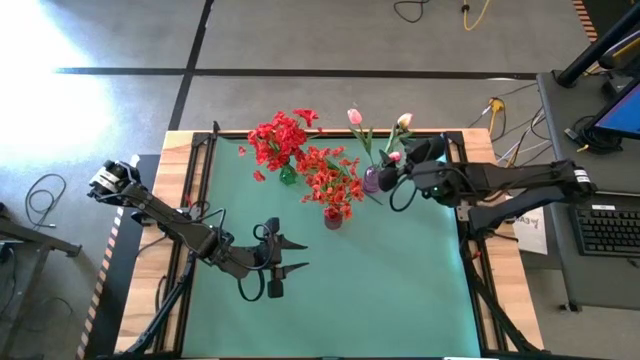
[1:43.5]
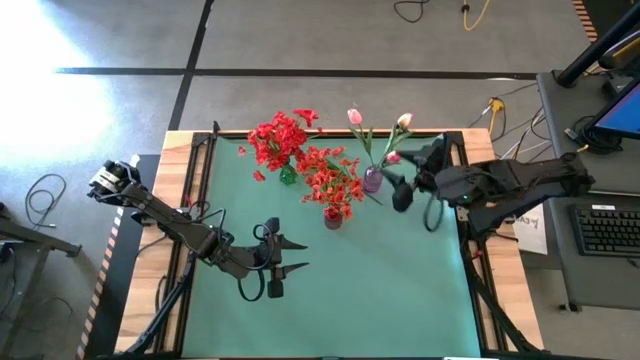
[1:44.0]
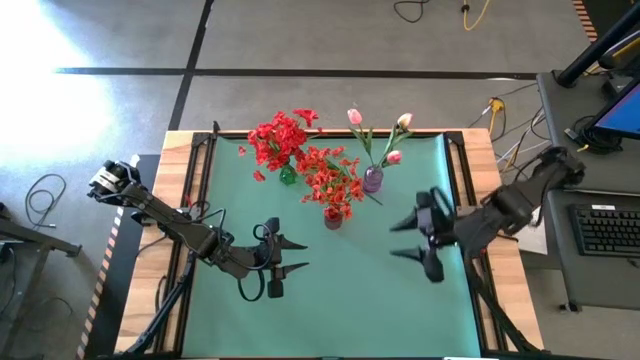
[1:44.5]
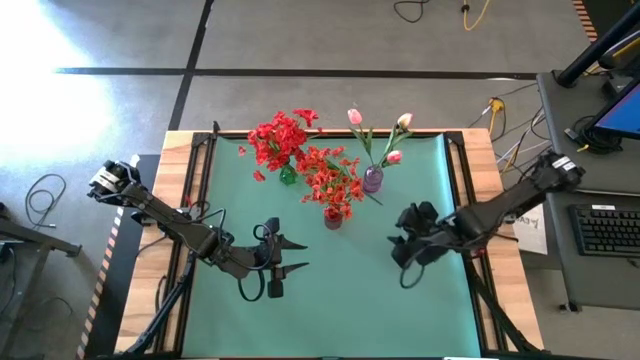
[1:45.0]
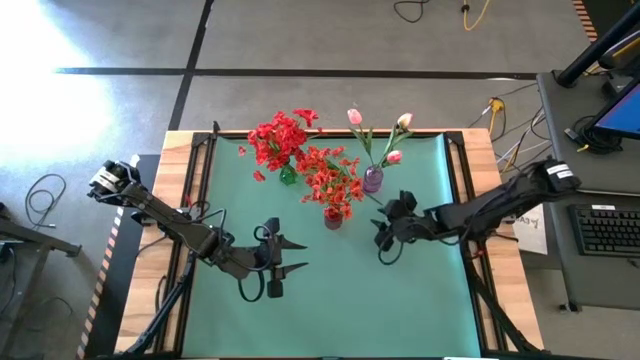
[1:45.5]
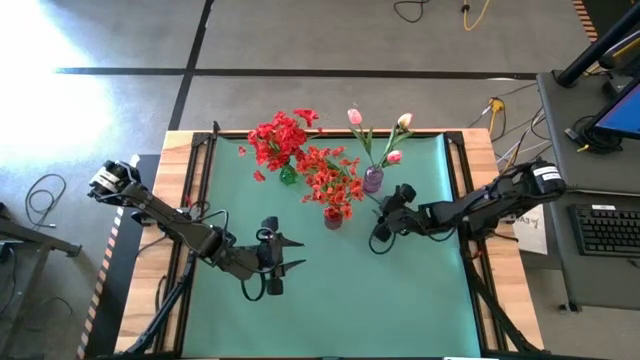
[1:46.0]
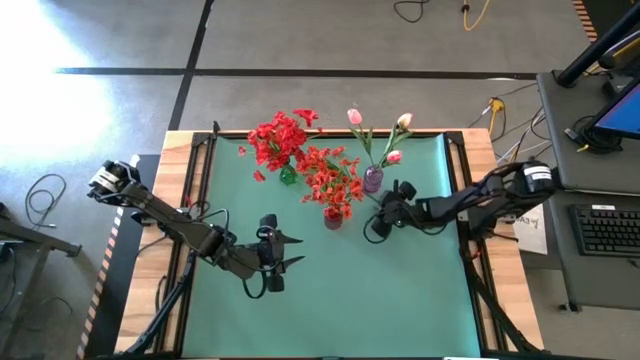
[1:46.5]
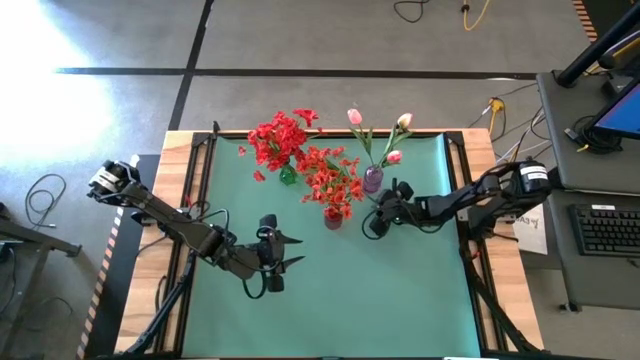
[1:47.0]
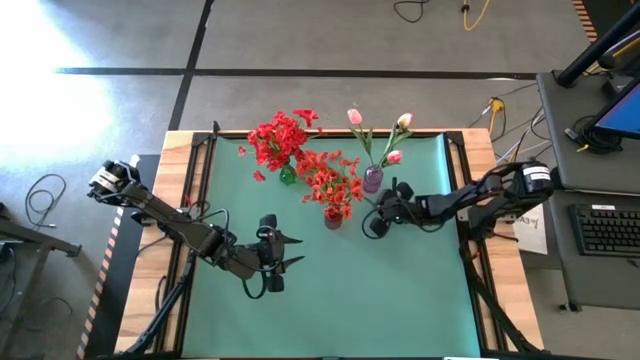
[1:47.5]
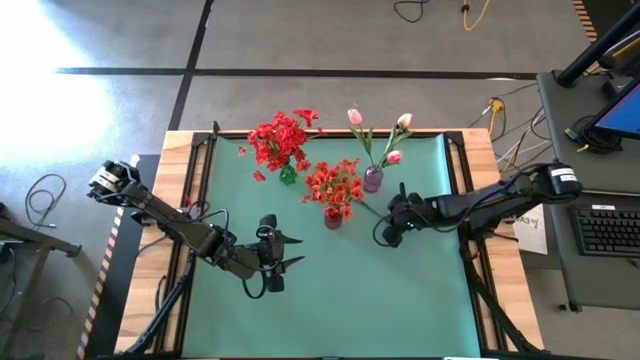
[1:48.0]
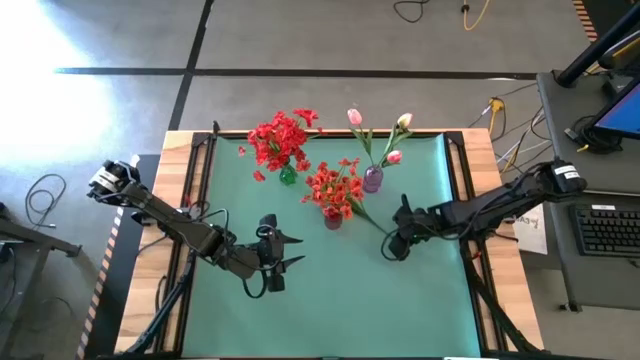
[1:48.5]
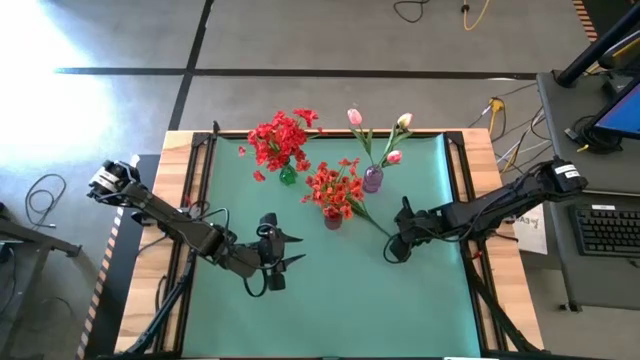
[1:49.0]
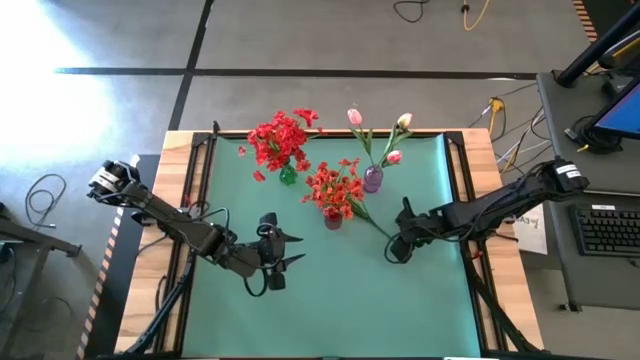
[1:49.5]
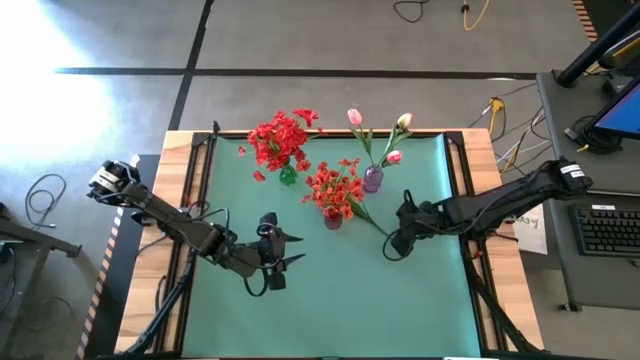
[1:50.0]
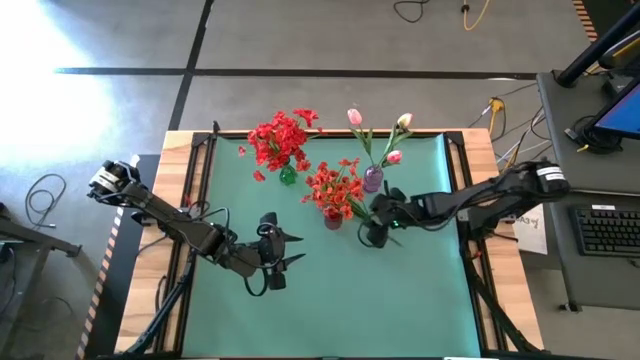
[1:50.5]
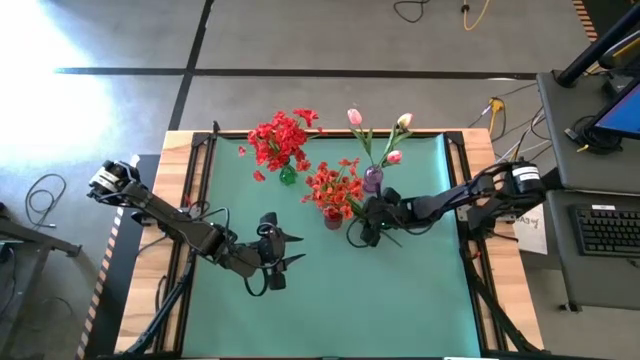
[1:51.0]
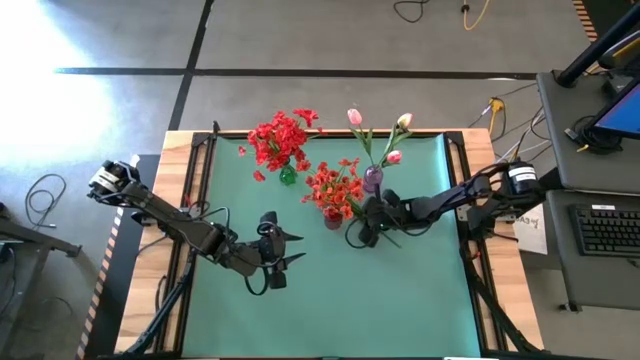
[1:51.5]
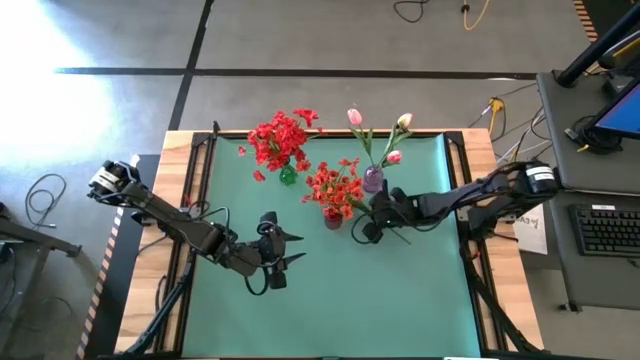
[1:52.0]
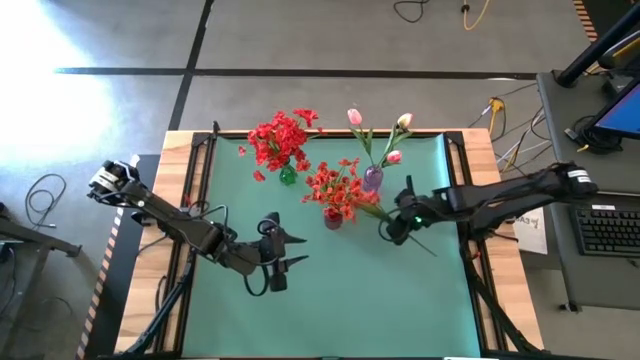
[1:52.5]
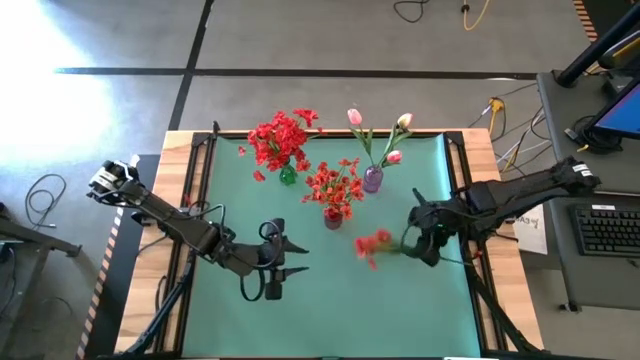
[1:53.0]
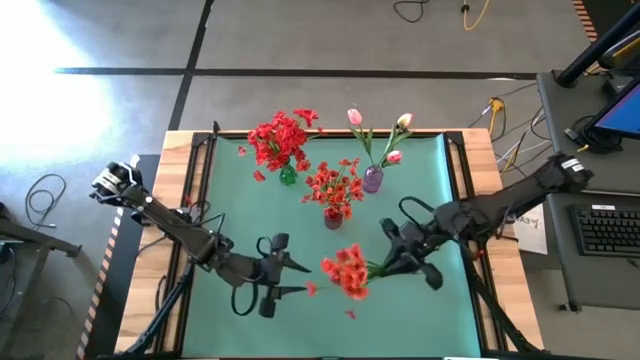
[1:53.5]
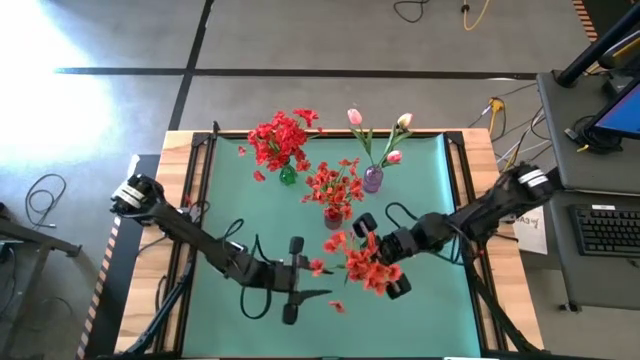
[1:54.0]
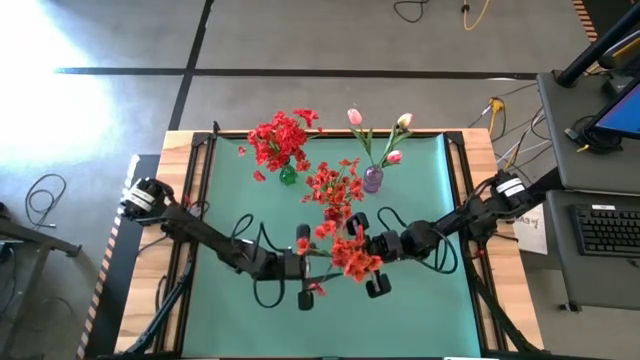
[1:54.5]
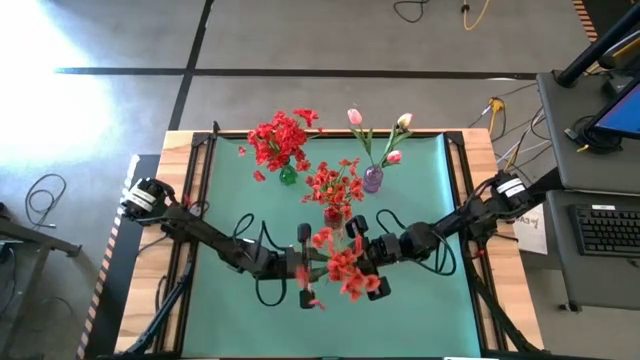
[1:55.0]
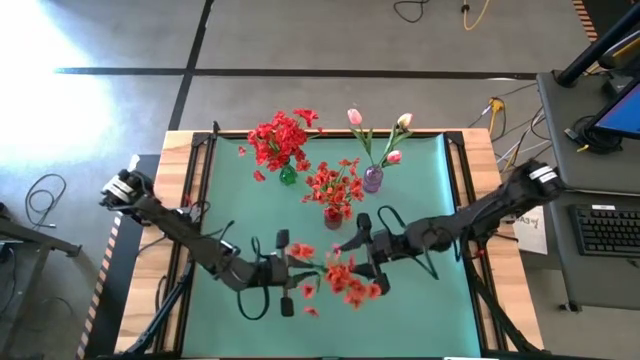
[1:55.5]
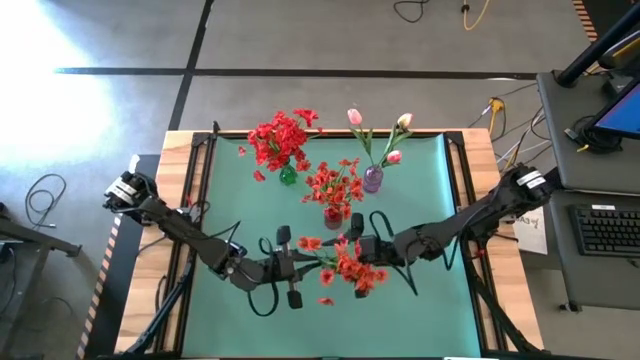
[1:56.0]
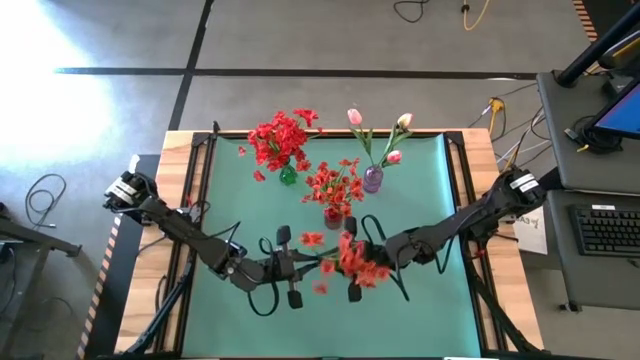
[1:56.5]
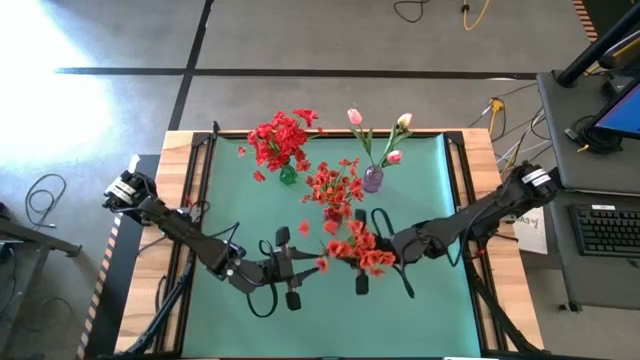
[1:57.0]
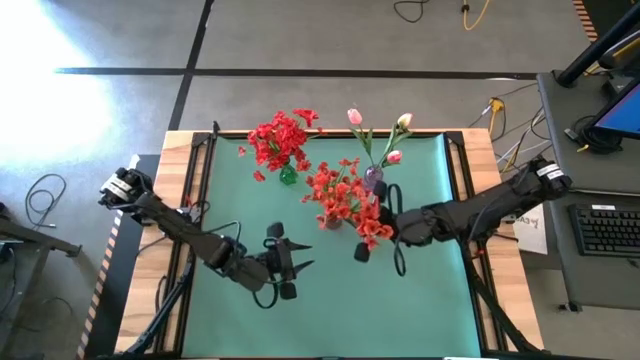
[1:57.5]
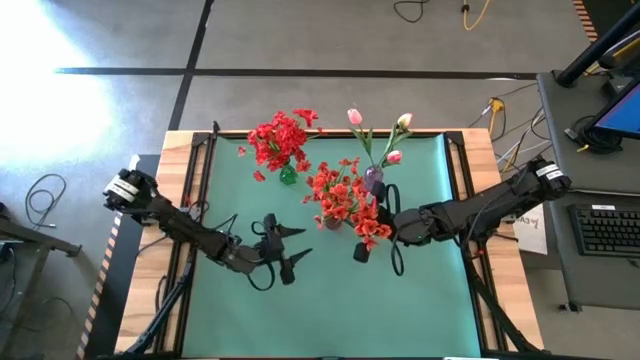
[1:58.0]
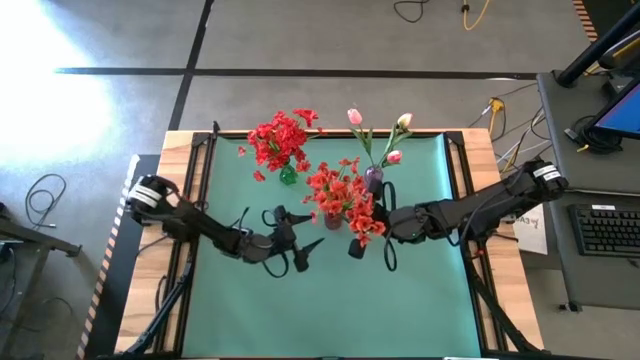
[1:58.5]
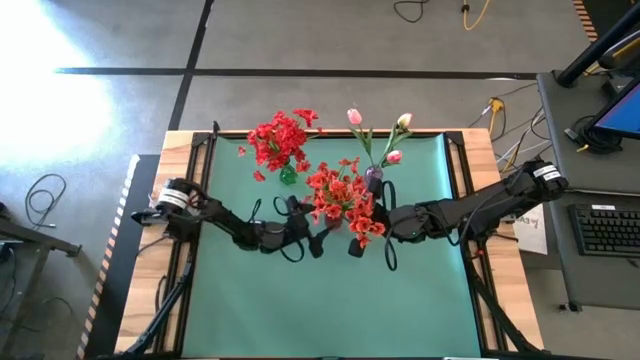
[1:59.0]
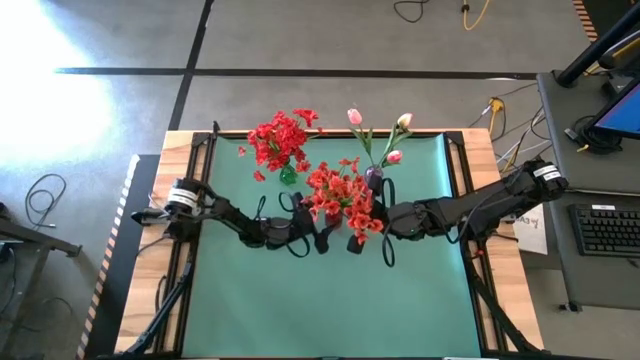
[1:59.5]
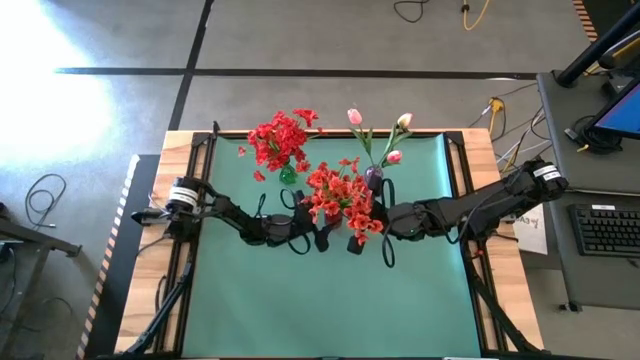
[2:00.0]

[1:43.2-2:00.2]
Task: Sort flowers into vase by color
Put the orange flowers into the red vase

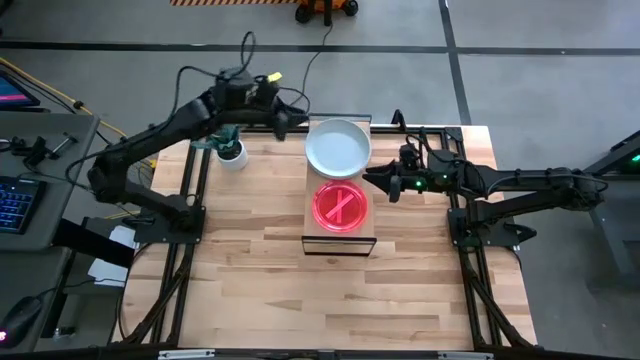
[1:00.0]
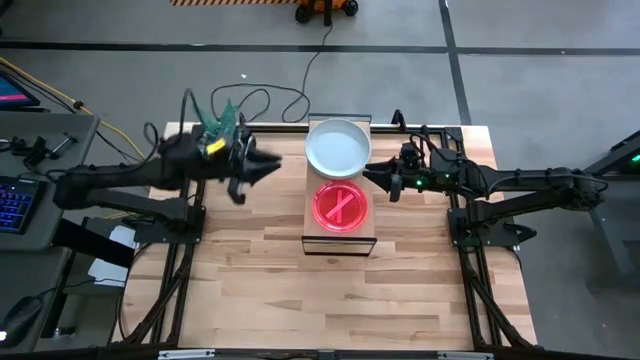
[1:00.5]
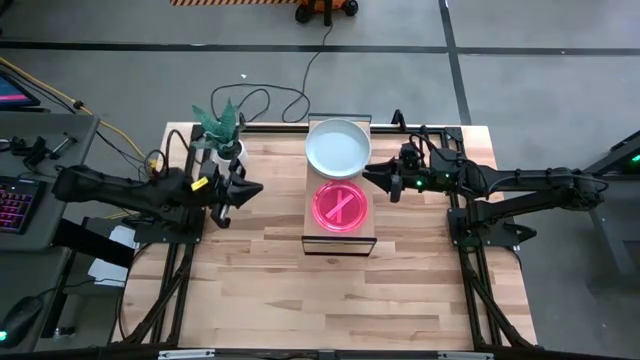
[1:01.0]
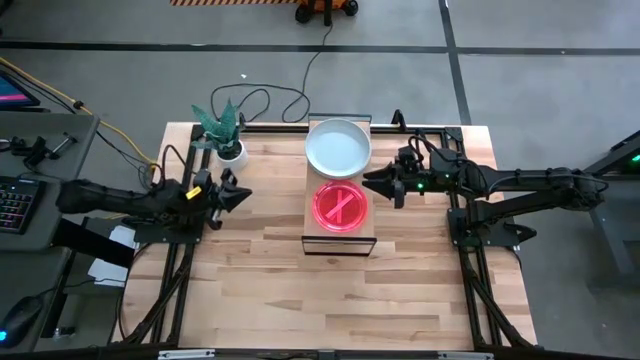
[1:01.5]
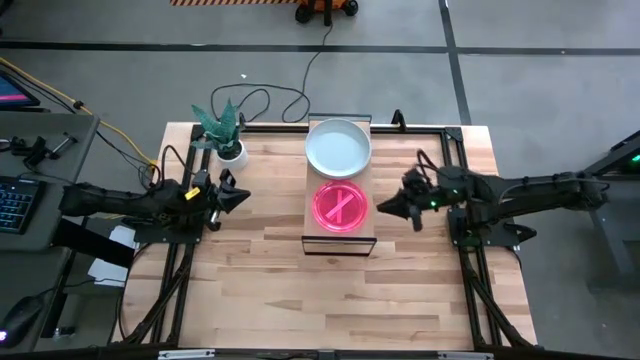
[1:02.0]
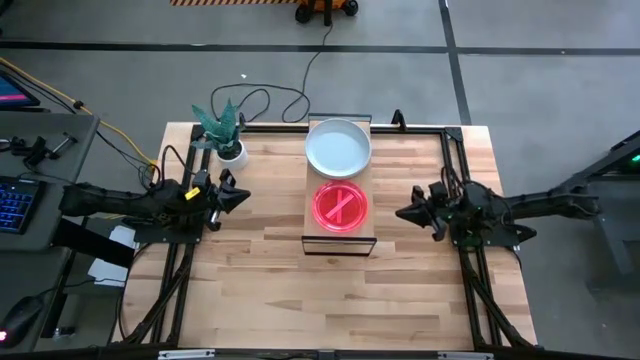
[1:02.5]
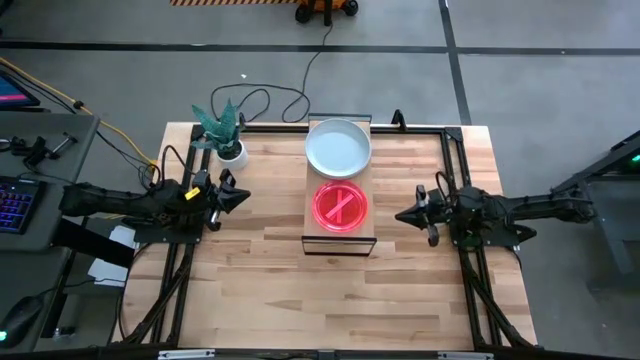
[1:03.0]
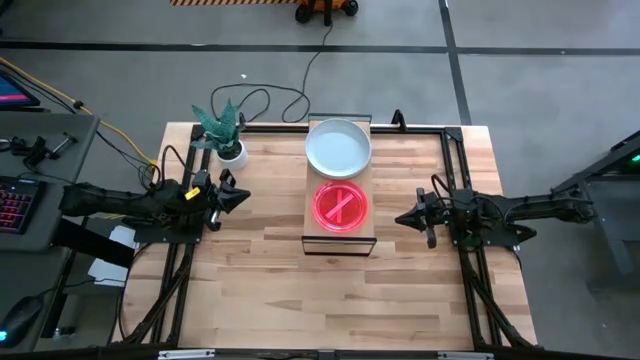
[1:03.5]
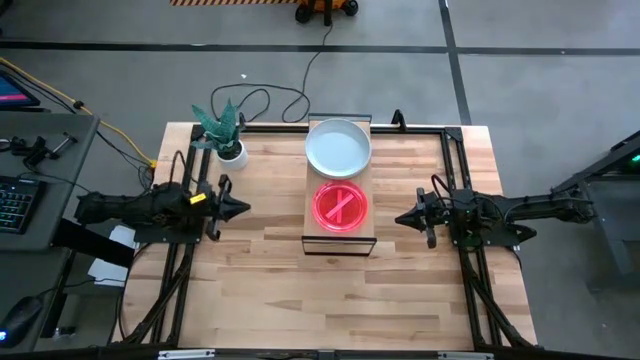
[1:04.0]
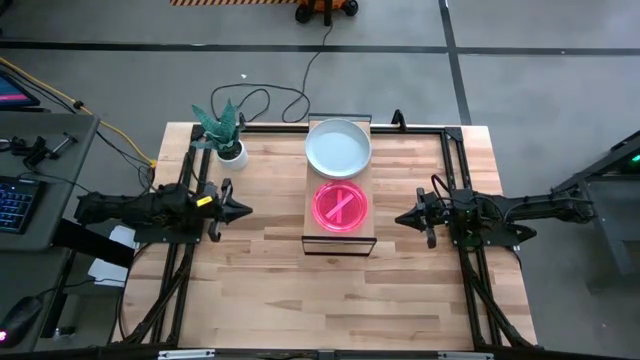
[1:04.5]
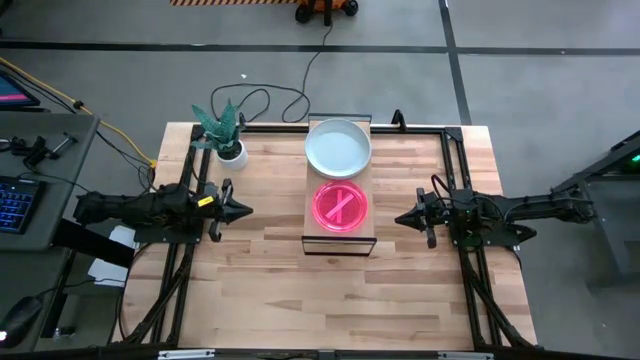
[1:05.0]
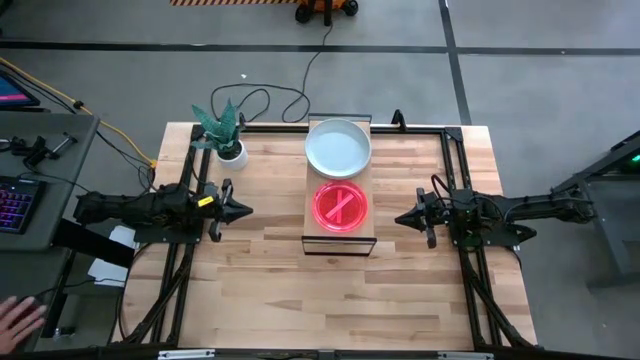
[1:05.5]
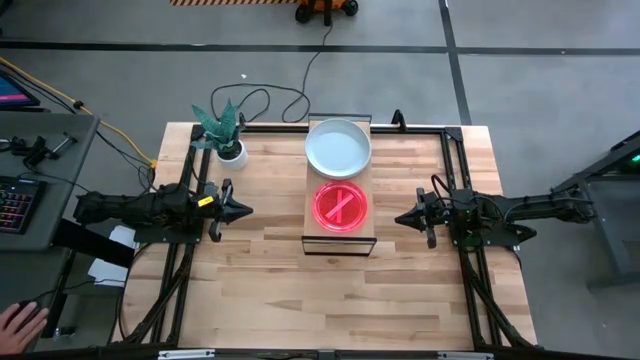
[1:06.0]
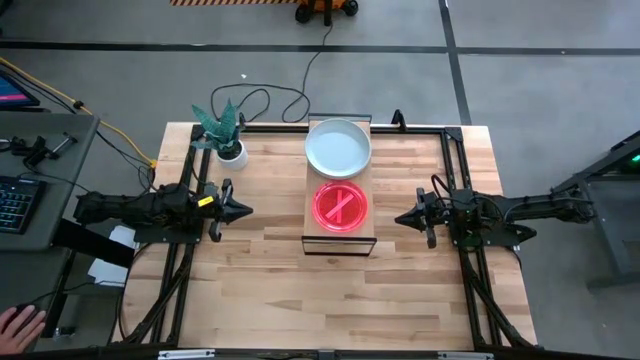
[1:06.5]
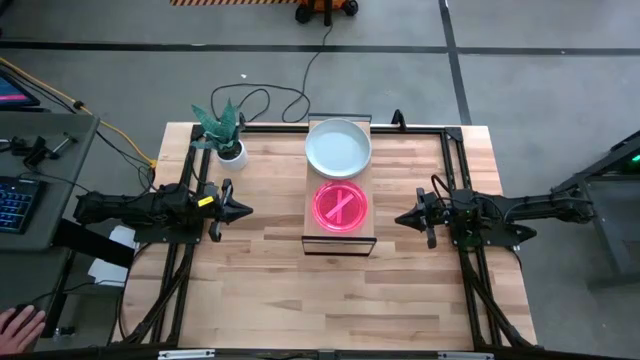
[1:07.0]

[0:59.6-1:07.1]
Task: Place and stack plates onto a shelf
Return to Home Position
